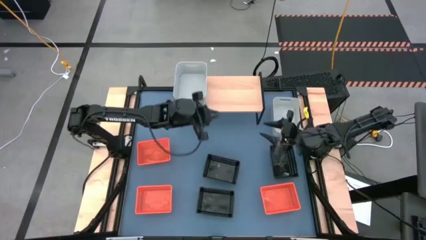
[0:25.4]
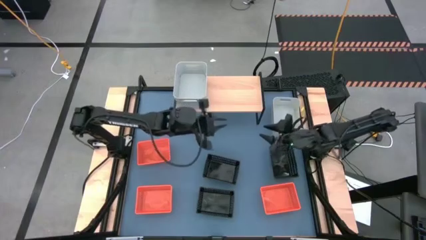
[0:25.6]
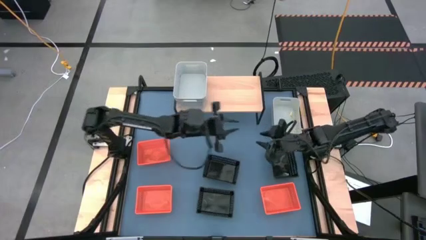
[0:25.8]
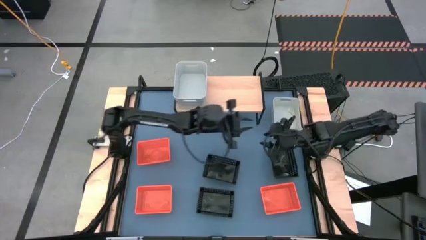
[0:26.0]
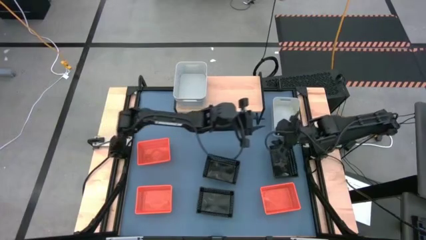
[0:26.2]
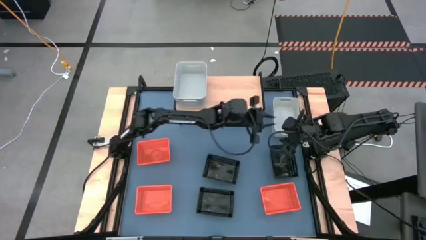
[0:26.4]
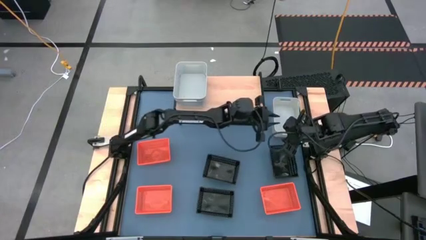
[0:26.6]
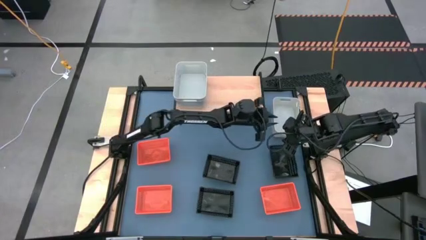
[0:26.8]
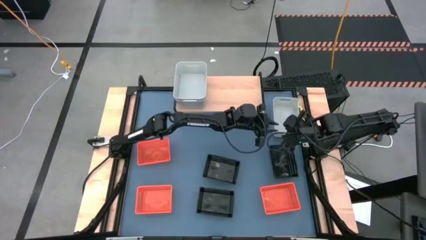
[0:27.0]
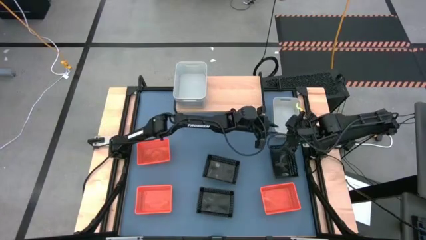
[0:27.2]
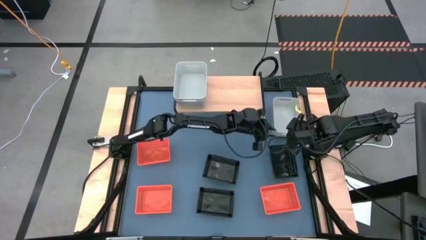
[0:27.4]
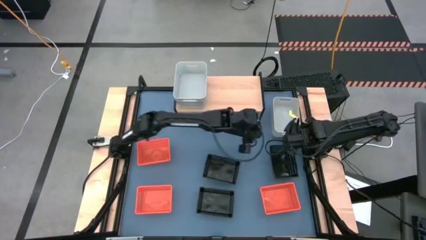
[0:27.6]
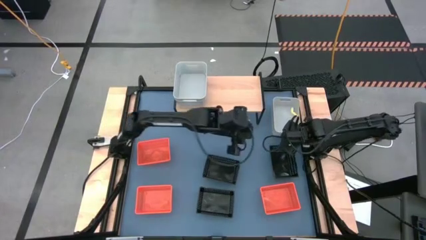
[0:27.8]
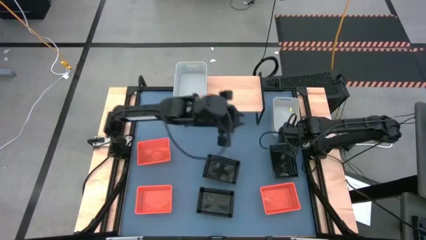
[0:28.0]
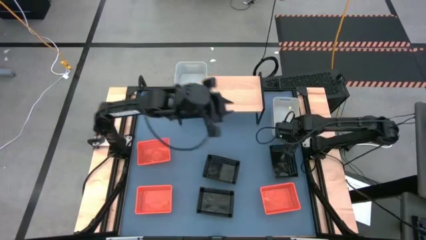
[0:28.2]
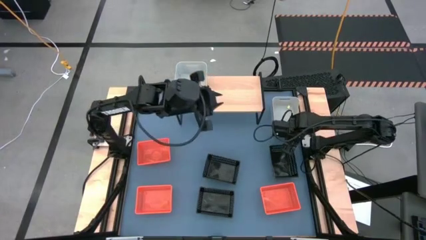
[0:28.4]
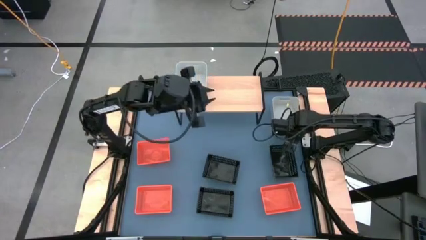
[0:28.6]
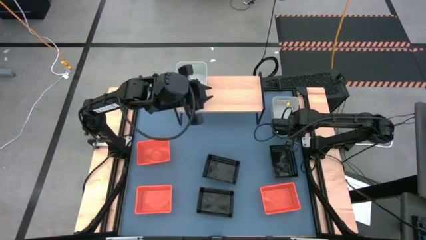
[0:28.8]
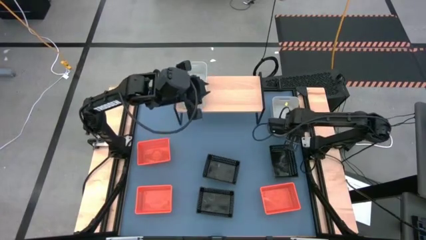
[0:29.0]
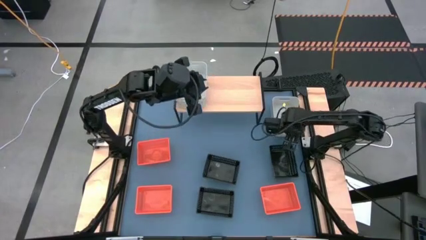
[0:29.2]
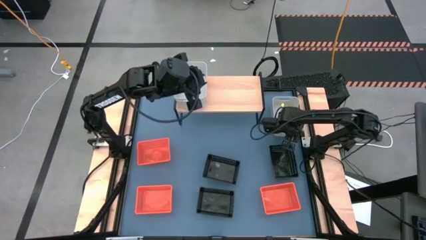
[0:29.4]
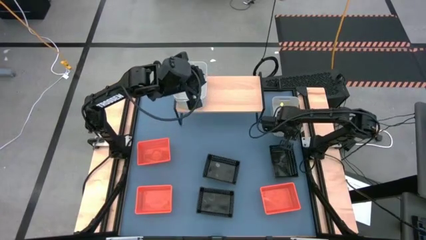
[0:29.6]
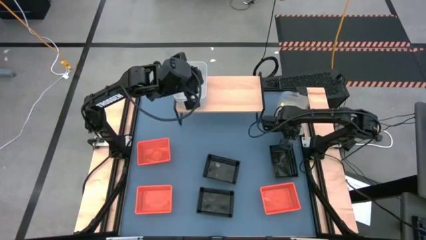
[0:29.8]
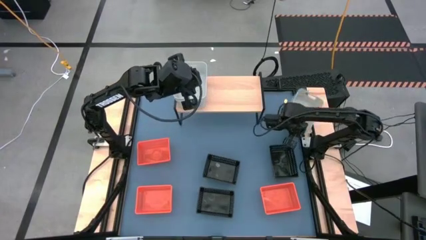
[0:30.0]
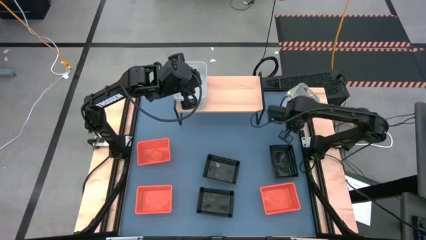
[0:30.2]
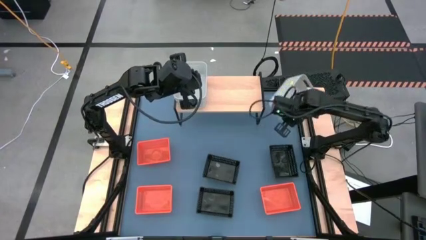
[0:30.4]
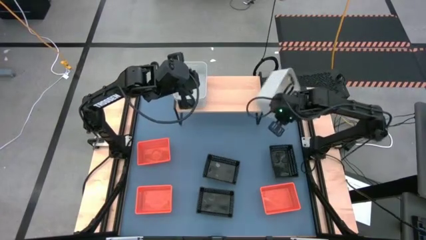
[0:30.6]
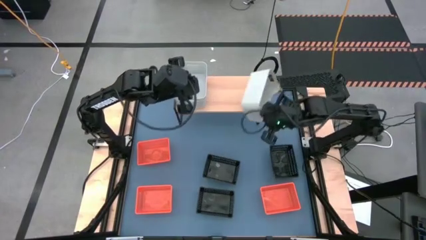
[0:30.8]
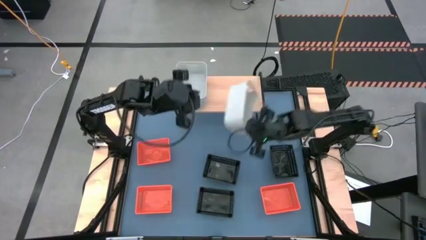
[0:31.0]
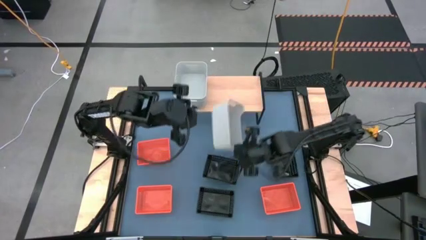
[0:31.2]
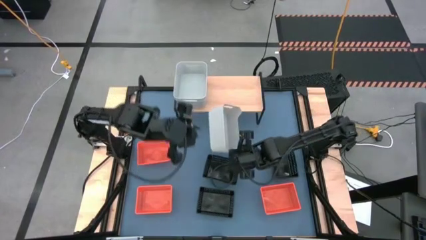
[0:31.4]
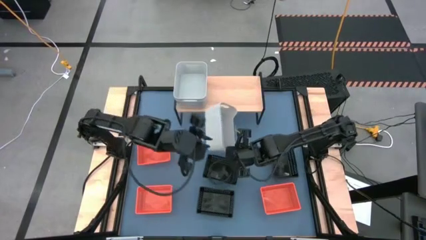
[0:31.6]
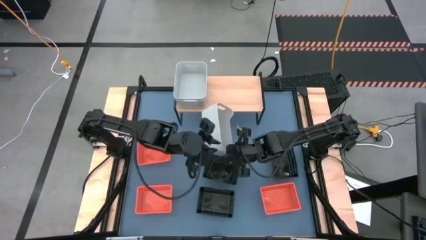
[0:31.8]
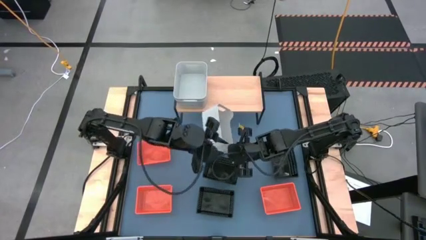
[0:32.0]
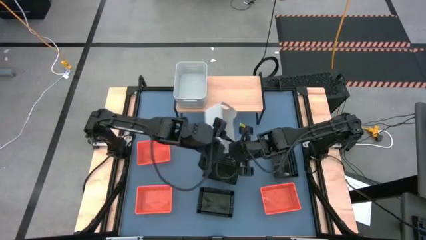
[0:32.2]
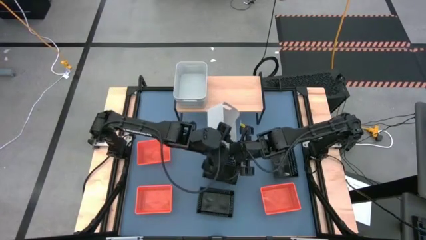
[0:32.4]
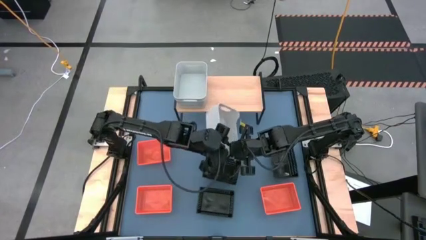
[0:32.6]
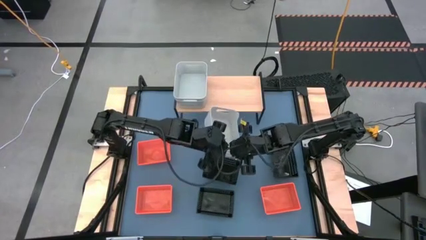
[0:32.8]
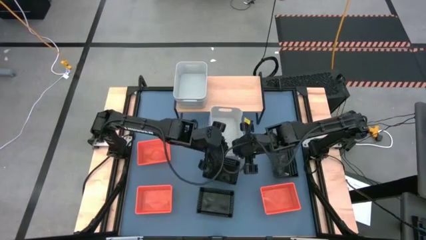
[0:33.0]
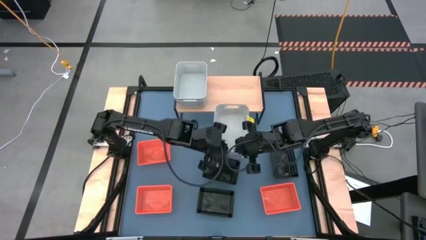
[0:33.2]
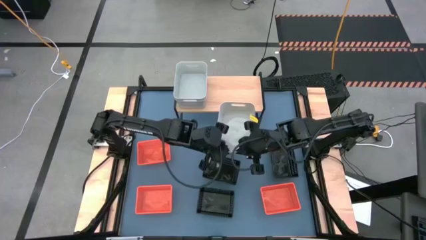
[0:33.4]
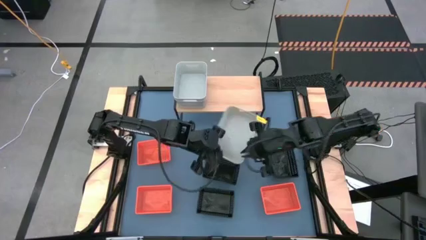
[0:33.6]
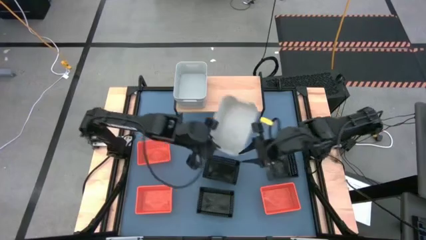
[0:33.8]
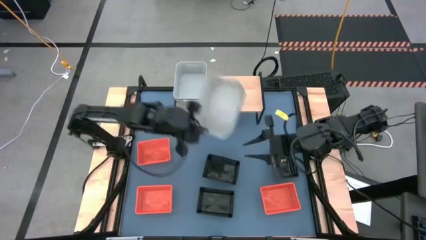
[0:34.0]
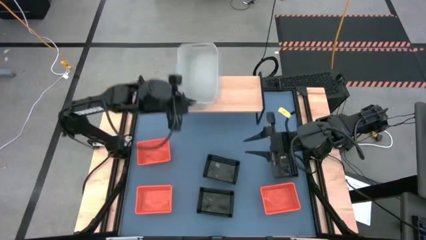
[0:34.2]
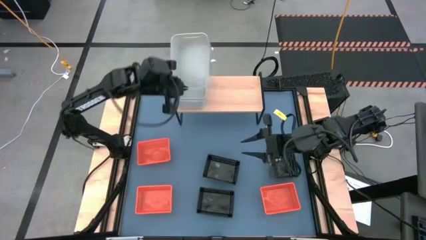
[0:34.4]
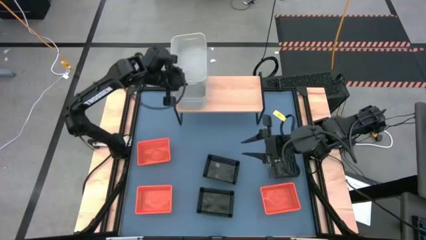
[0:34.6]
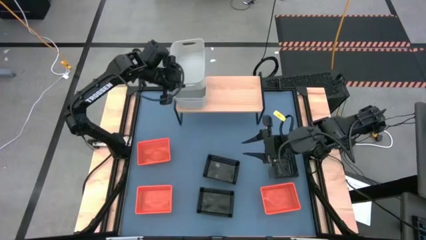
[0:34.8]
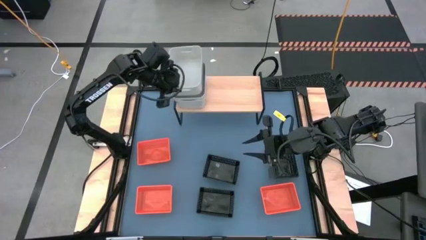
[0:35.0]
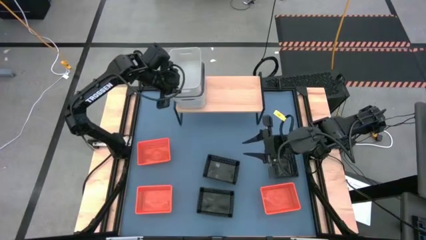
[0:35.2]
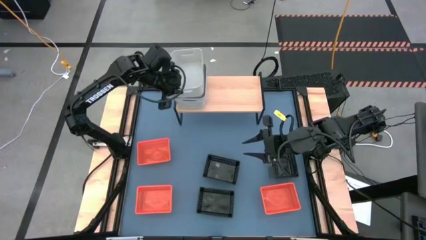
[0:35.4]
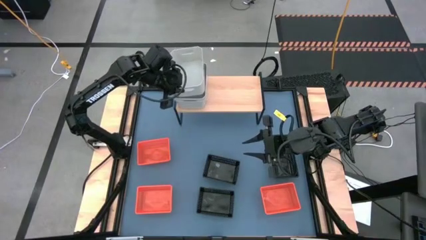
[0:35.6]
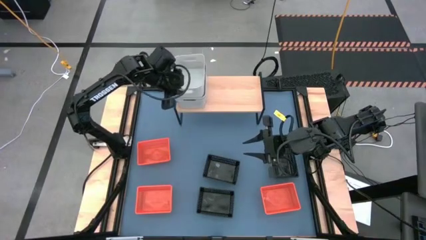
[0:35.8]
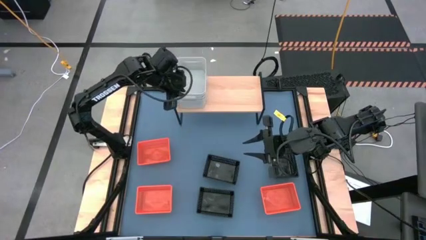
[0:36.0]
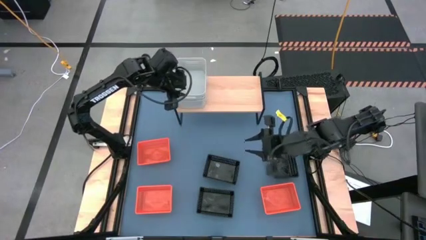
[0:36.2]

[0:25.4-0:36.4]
Task: Stack baskets on shelf by color
Stack the gray bin on top of the other gray bins on the shelf
